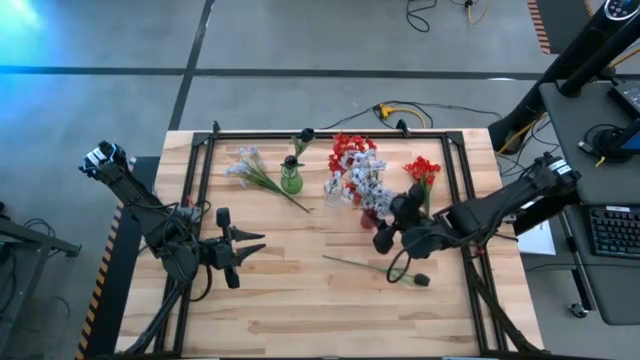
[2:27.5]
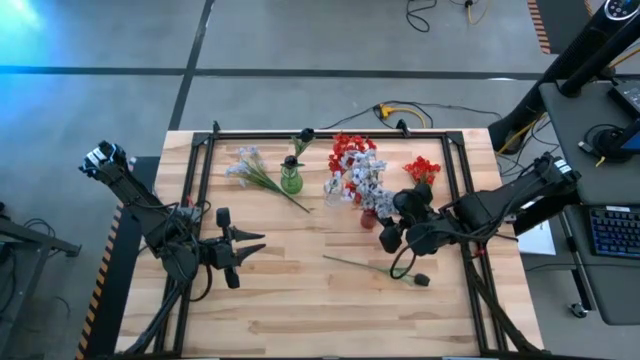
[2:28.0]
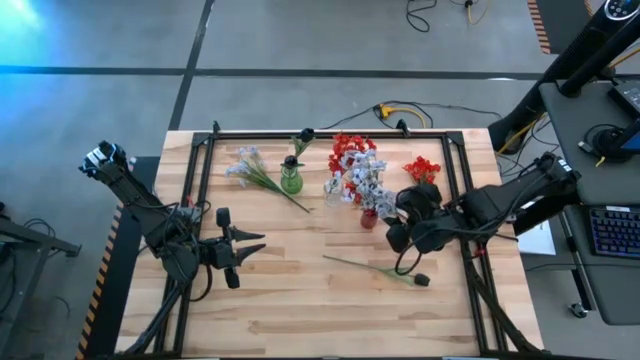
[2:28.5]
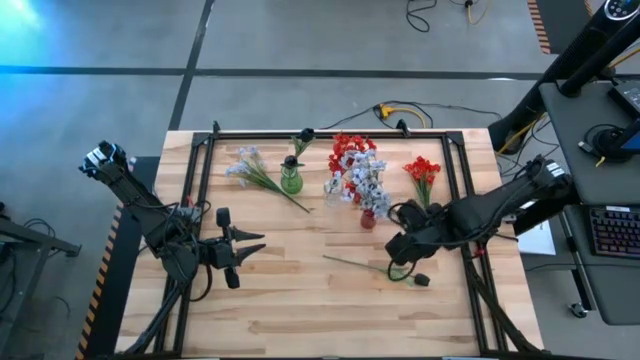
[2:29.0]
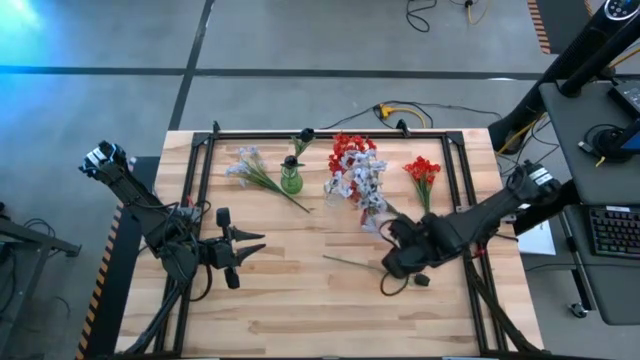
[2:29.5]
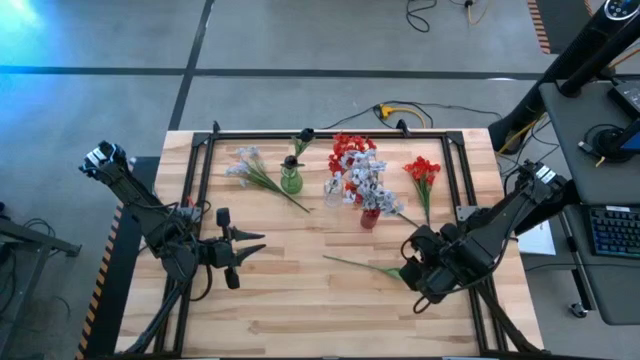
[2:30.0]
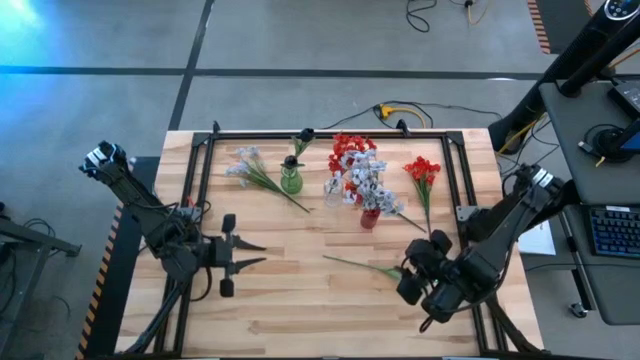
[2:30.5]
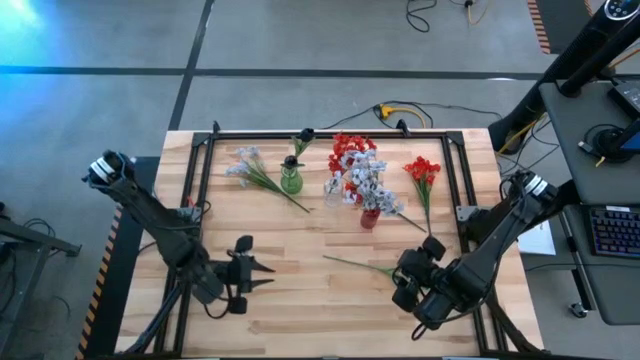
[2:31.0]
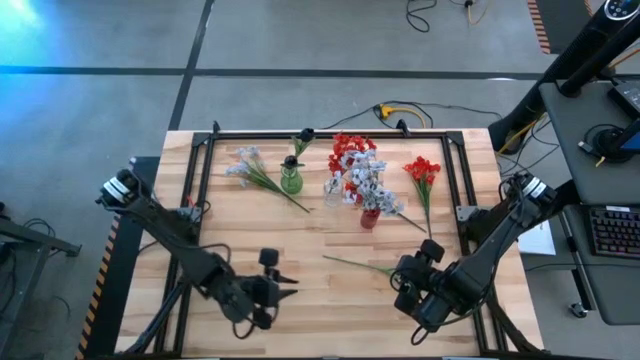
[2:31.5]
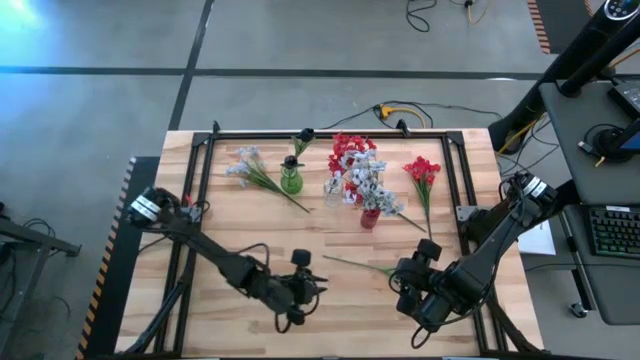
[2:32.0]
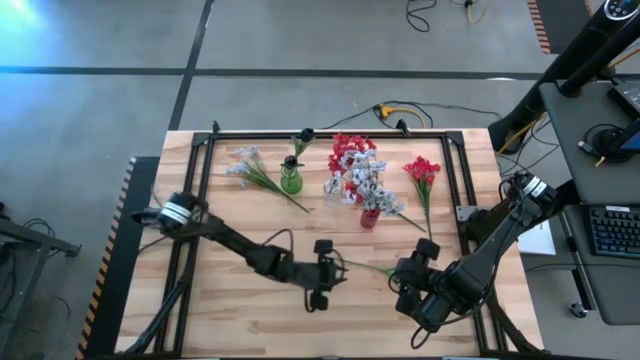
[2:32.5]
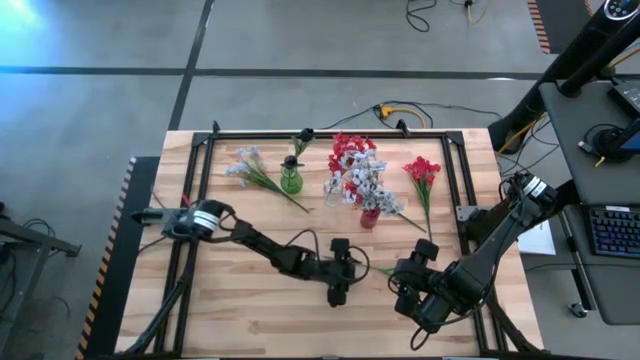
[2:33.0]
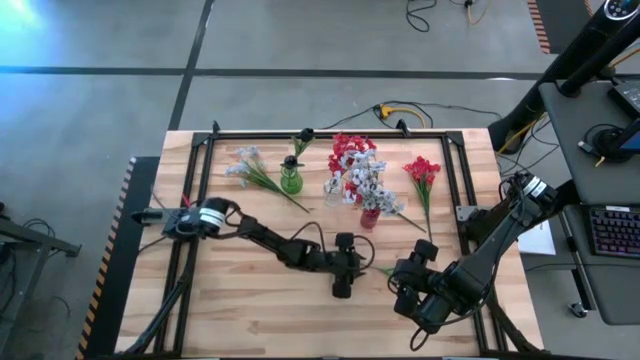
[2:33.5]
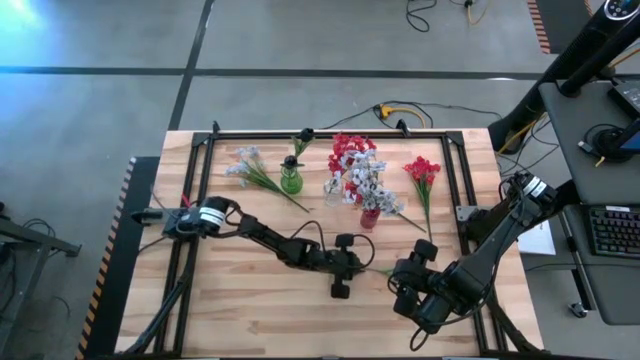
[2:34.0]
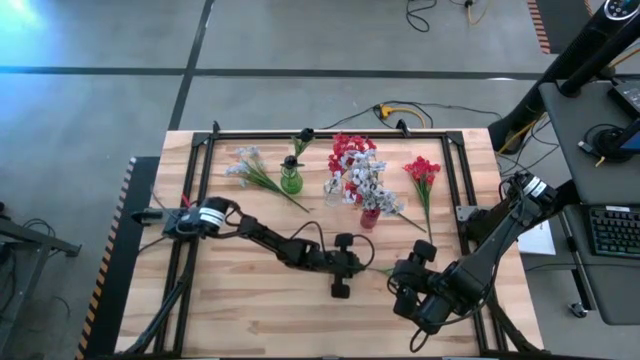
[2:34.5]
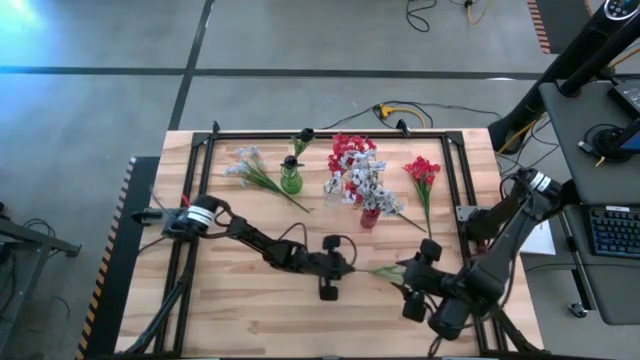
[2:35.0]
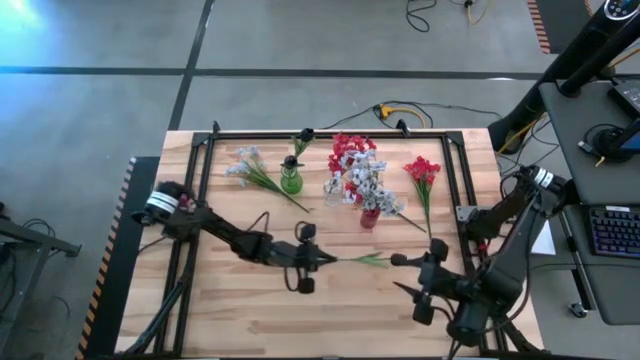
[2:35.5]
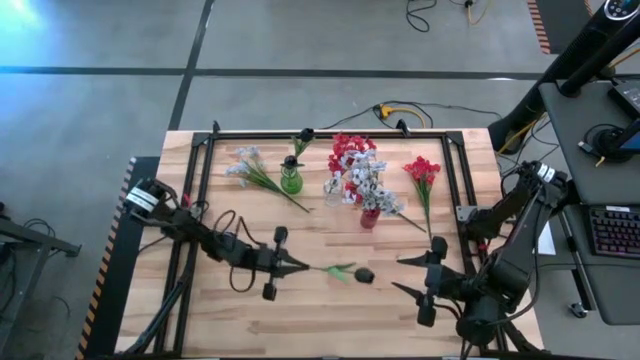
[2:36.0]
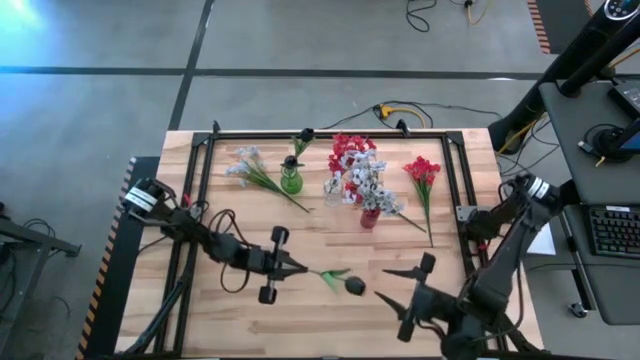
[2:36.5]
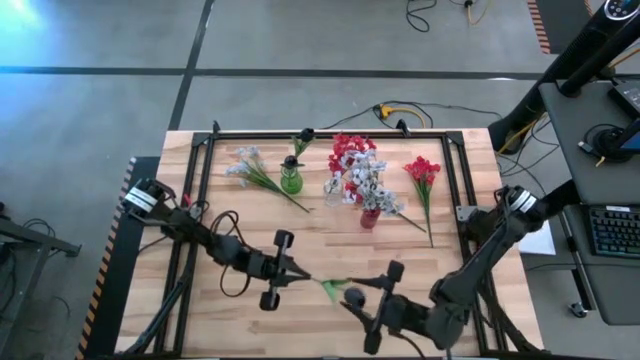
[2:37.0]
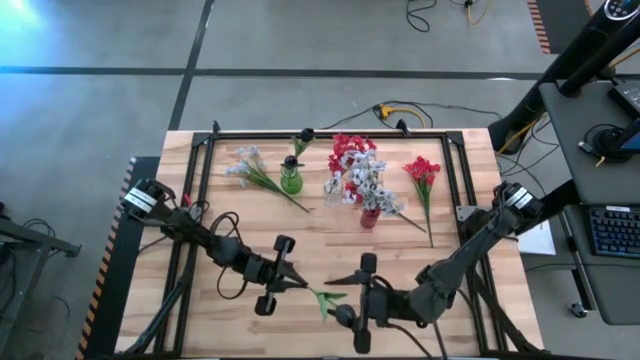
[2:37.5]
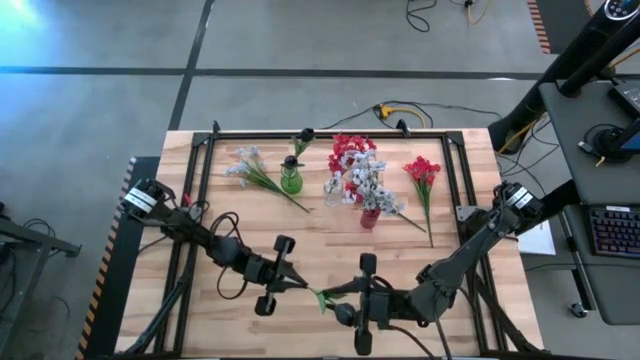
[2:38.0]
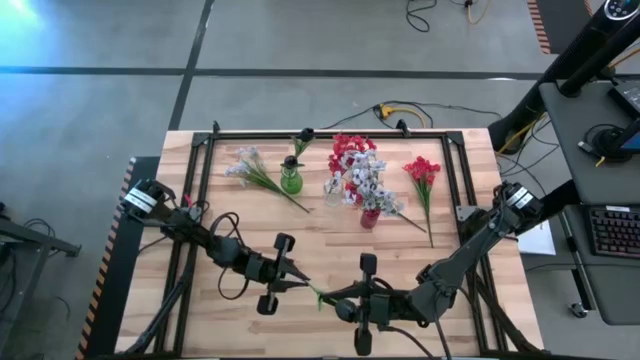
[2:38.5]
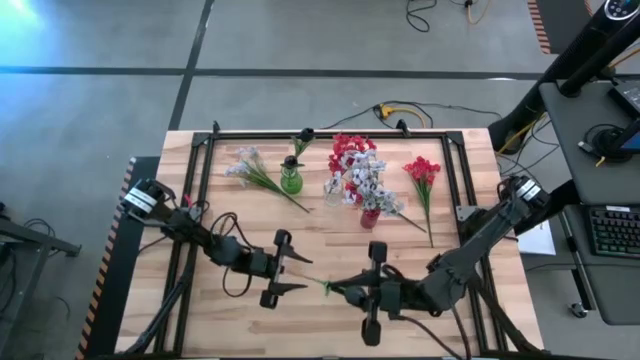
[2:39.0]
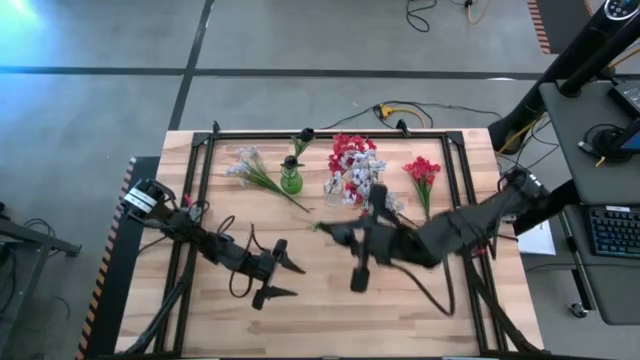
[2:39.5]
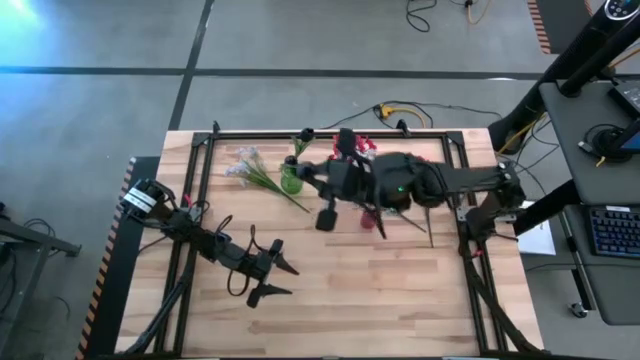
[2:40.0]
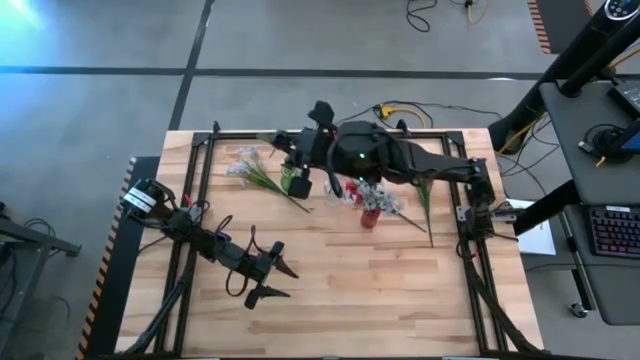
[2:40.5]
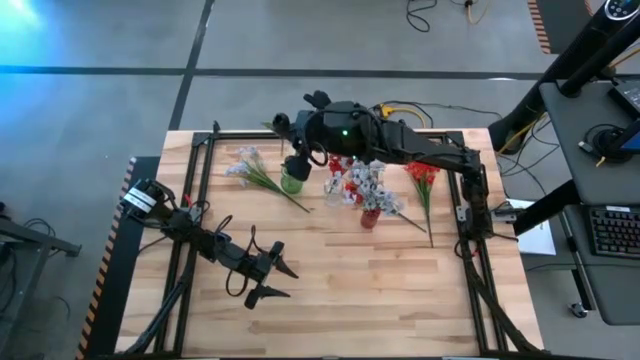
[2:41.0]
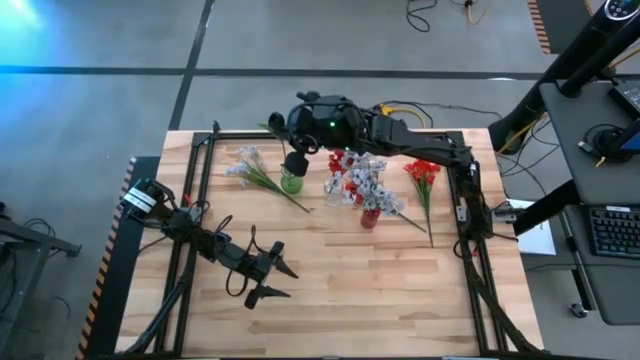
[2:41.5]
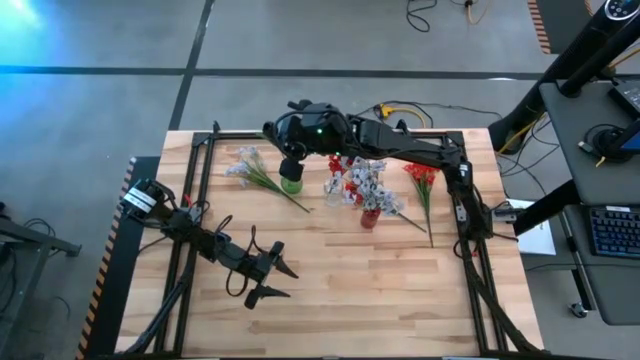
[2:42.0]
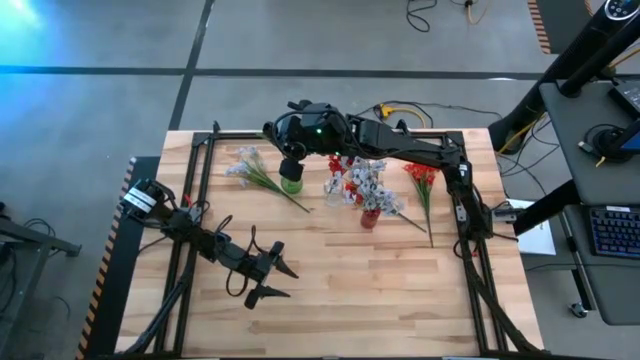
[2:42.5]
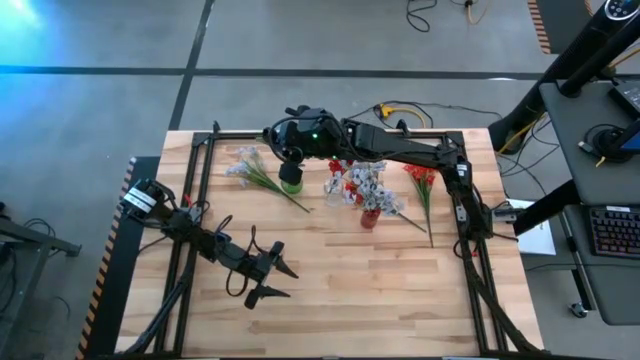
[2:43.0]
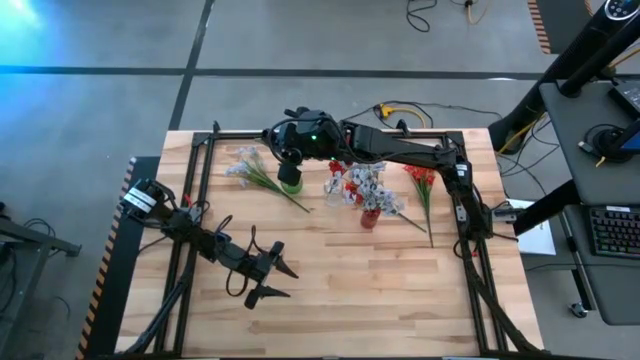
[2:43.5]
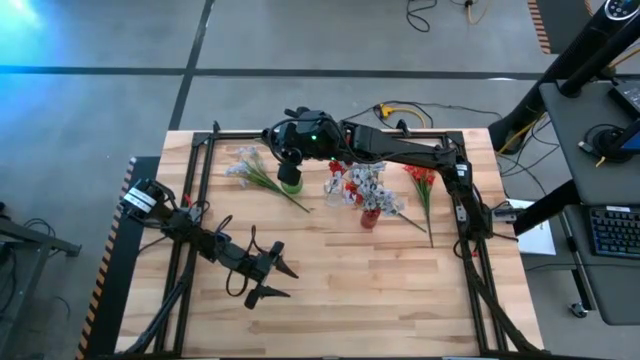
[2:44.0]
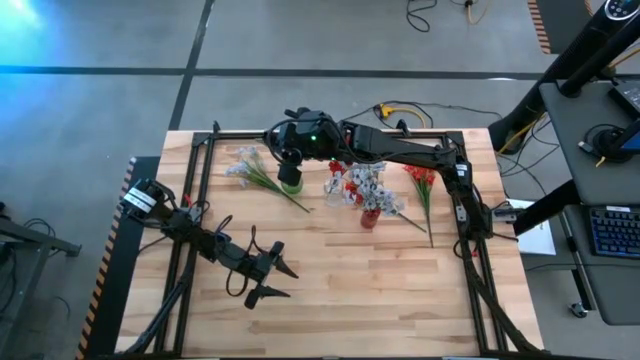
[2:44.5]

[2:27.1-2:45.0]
Task: Sort flowers into vase by color
Put the black tulip into the green vase

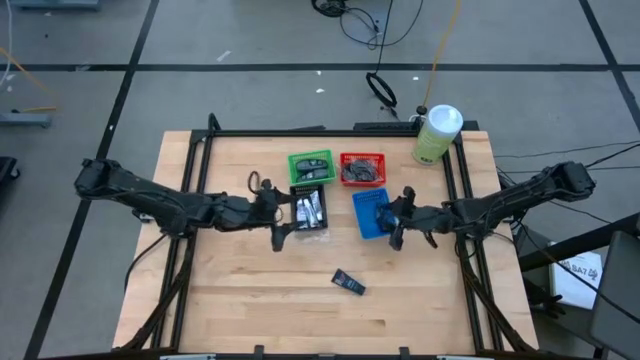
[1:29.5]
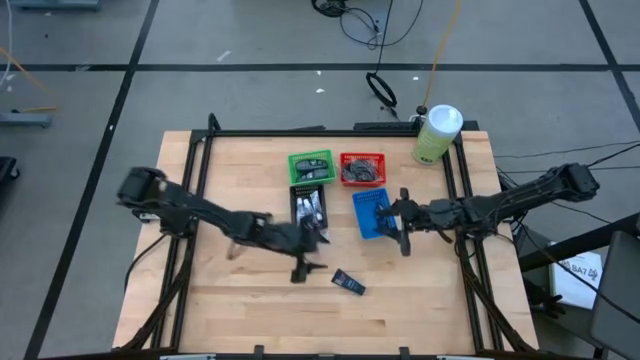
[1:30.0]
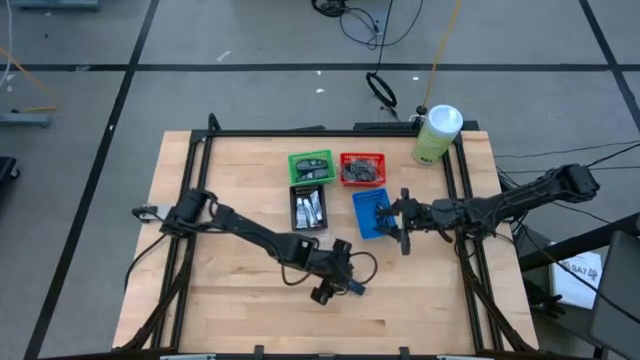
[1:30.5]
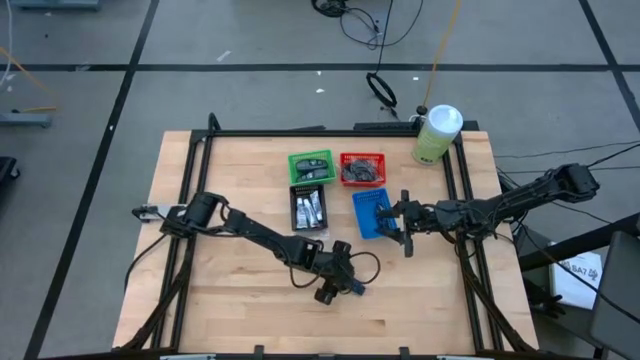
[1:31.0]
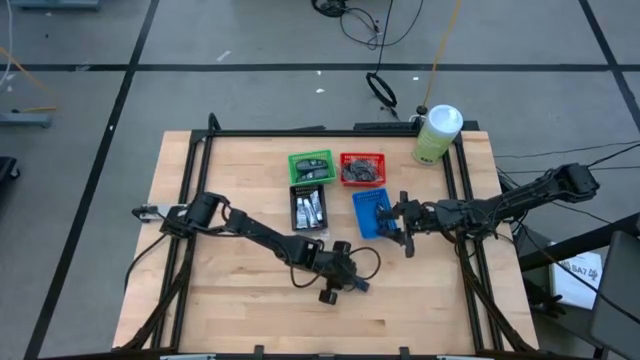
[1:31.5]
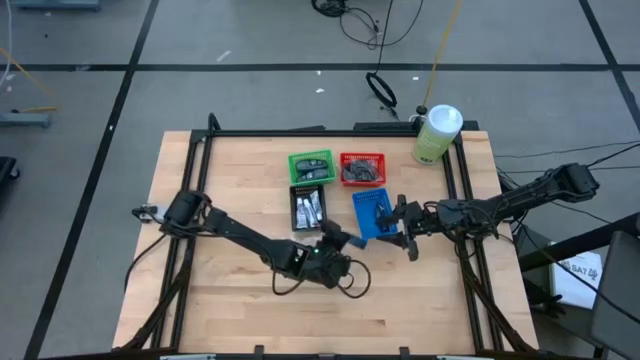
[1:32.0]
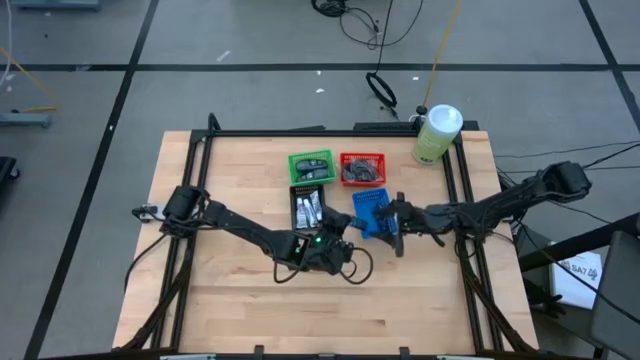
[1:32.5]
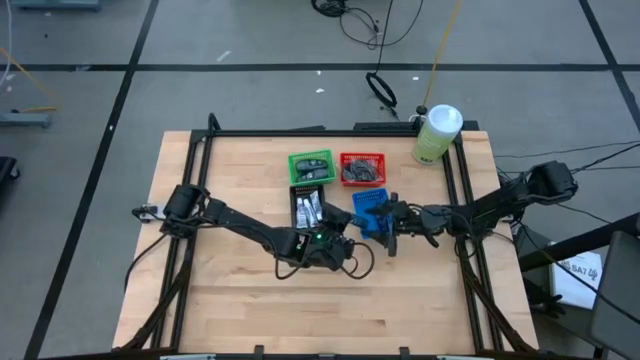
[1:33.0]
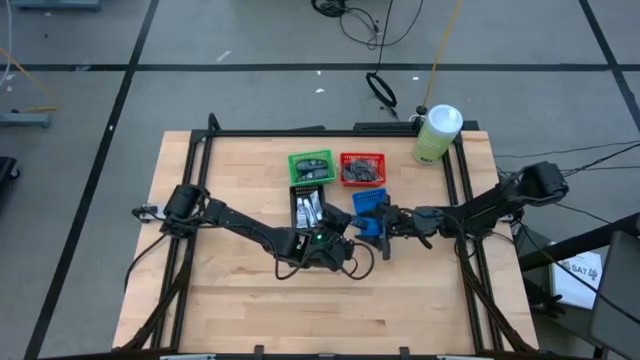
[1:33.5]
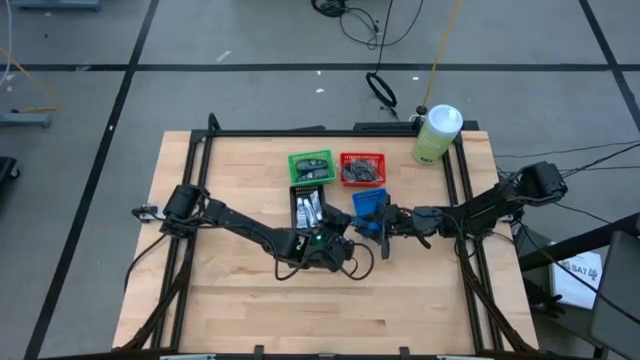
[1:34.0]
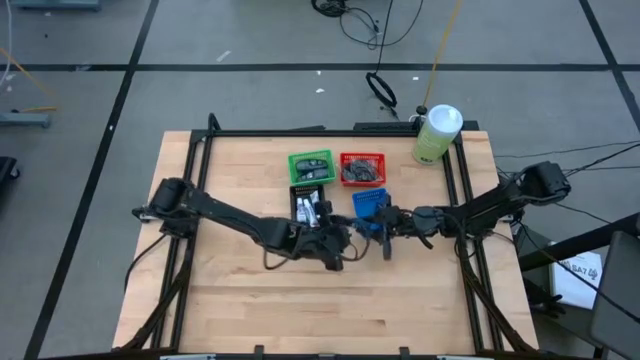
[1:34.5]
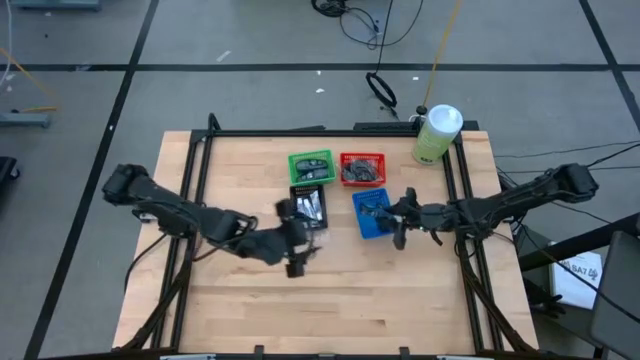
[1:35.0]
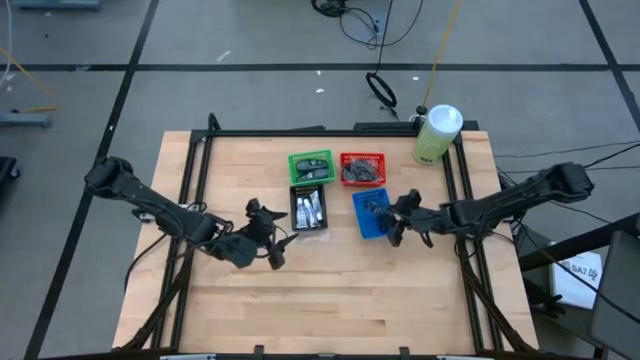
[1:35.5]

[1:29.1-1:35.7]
Task: Pick & Place Travel size toiletries
Put the blue shave cream into the blue bin
